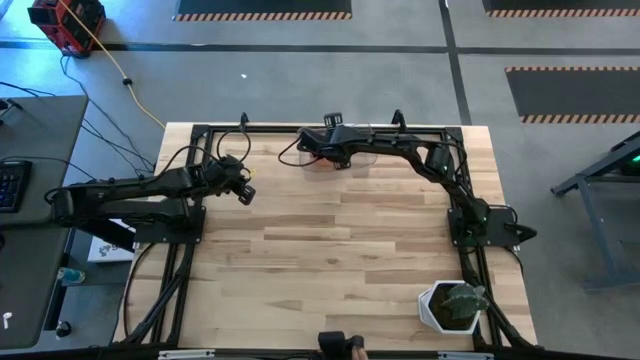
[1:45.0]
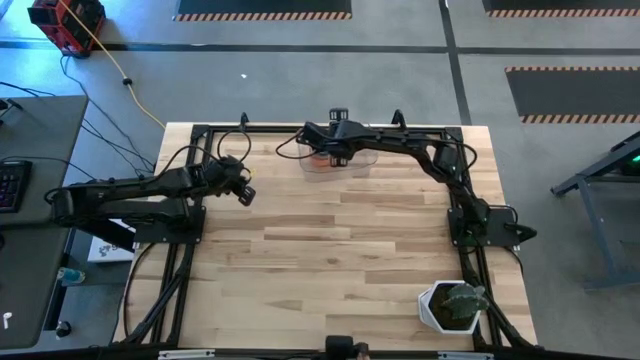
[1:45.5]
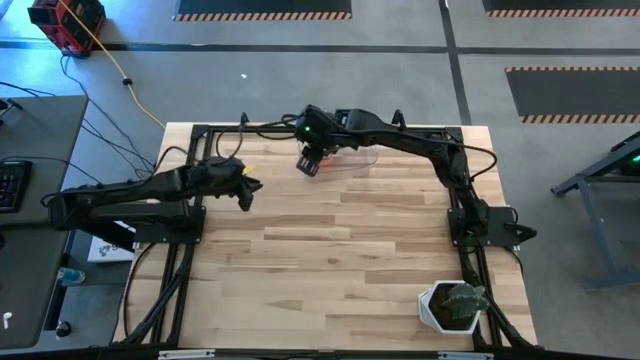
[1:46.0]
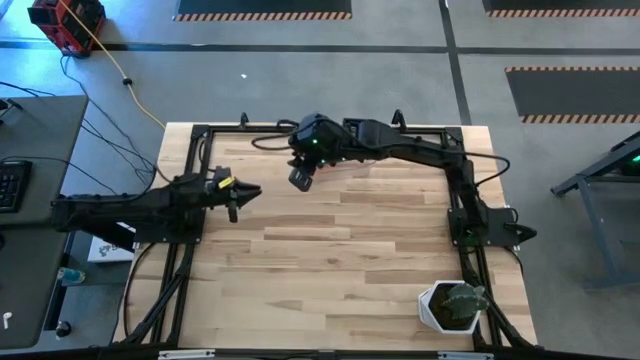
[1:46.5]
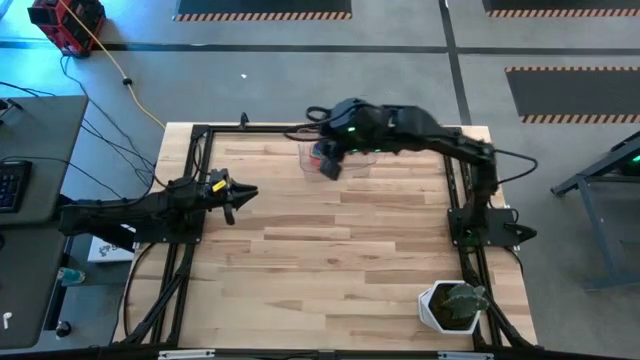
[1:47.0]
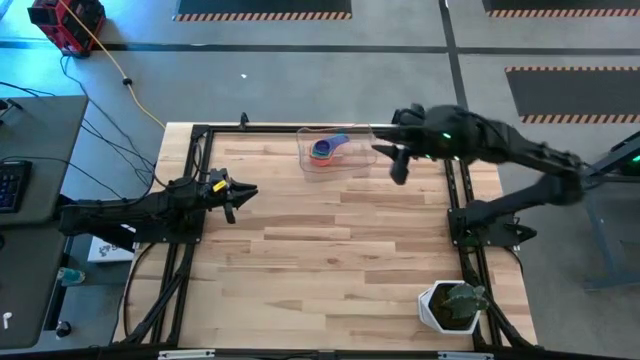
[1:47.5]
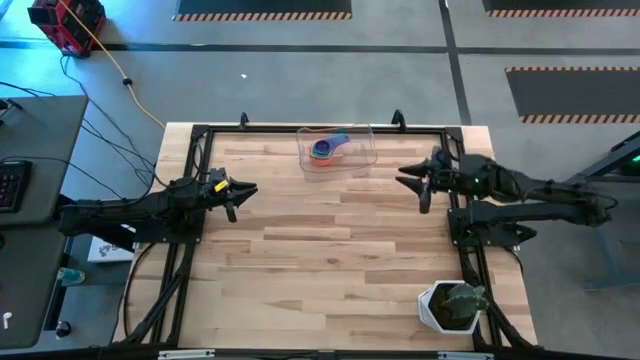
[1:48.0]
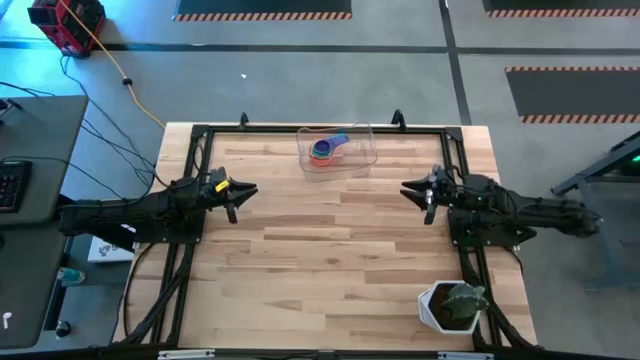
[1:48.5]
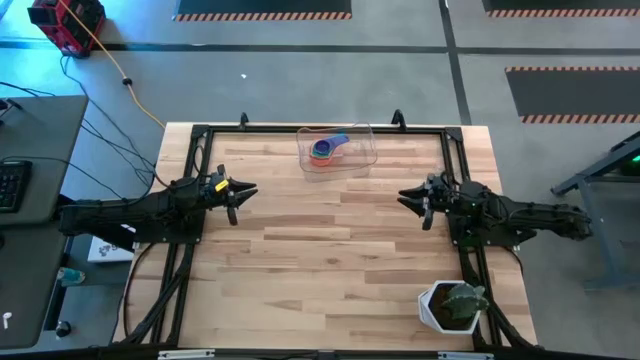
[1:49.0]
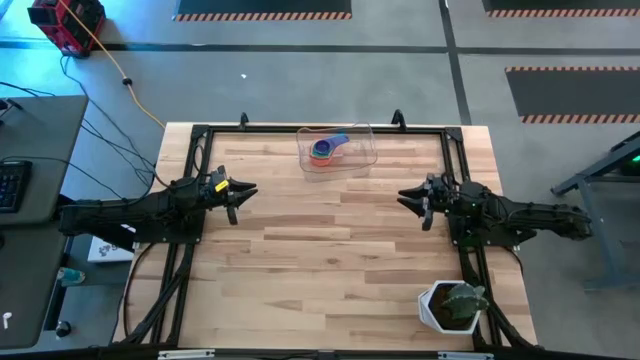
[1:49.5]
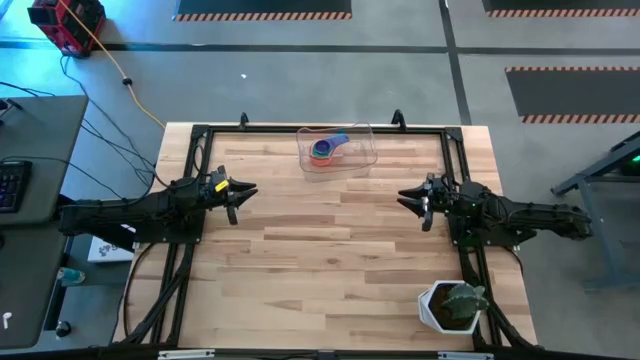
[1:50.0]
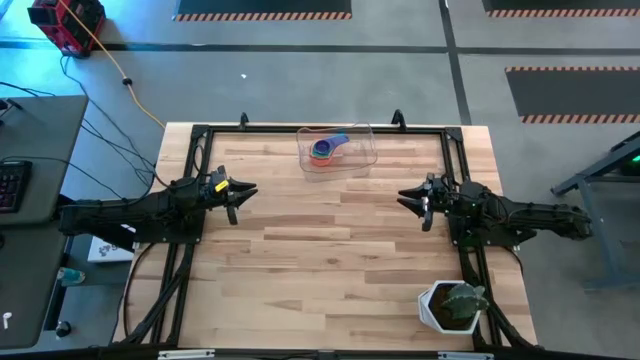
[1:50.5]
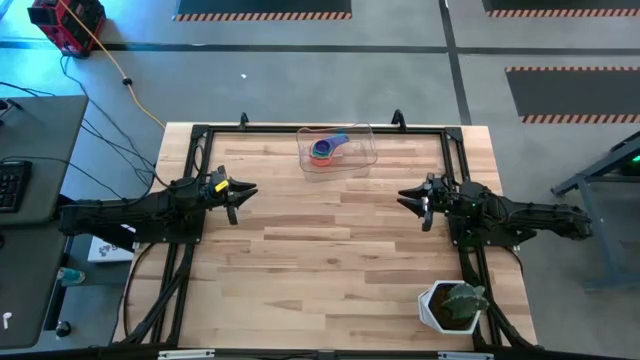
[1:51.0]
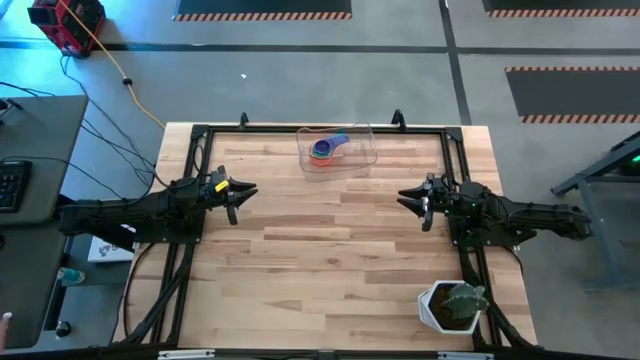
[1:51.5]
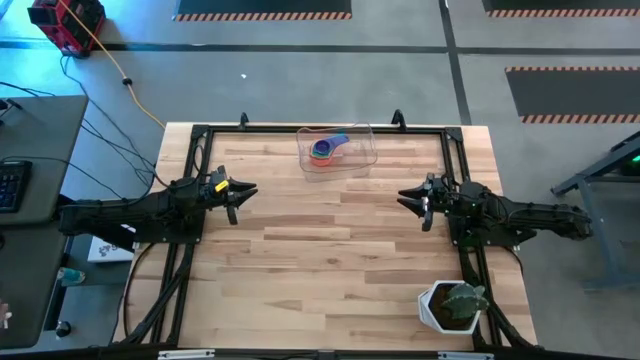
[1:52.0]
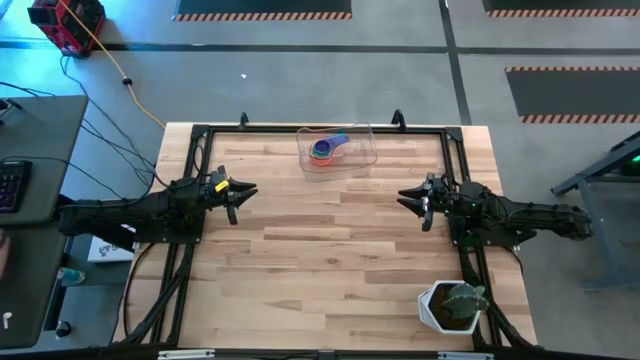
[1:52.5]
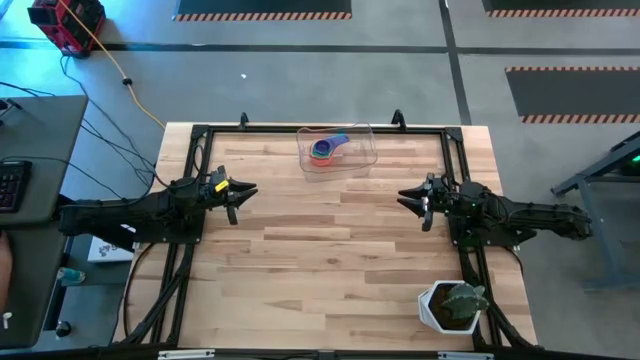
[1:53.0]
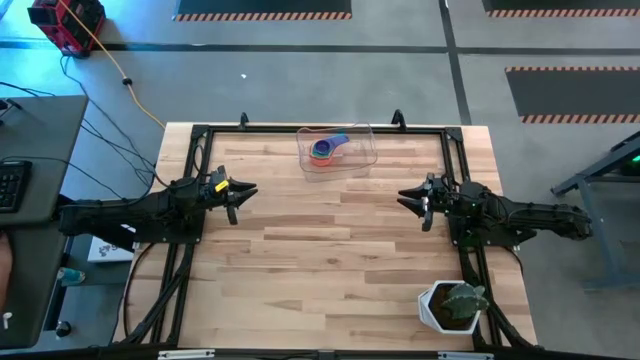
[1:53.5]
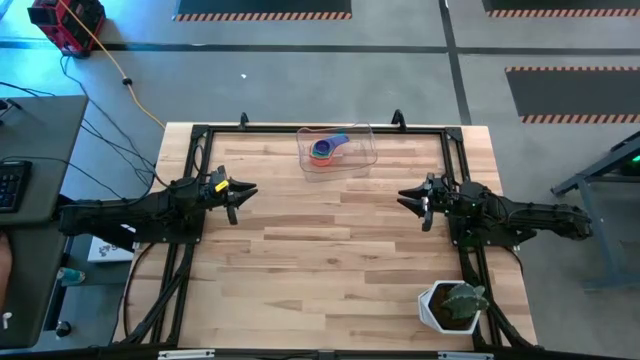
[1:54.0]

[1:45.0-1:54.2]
Task: Nest measuring cups in basket
Return to Home Position

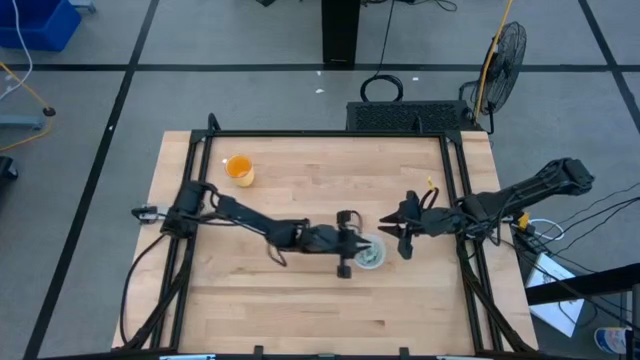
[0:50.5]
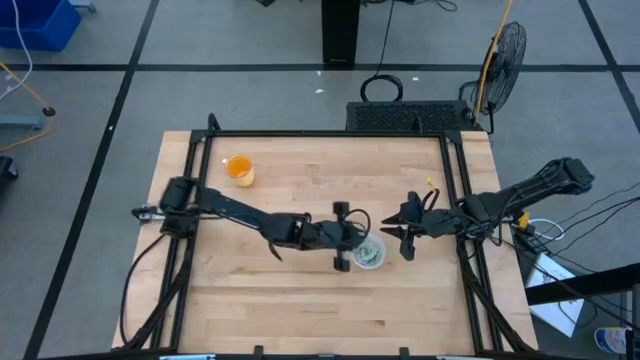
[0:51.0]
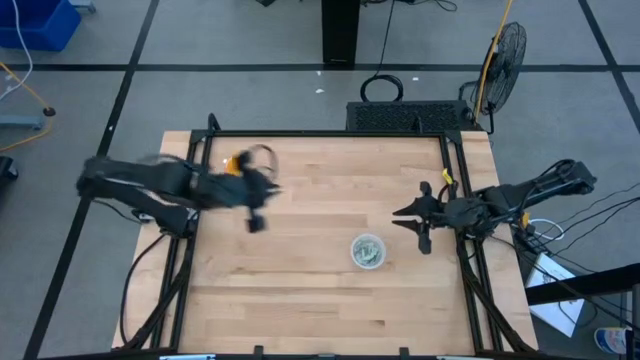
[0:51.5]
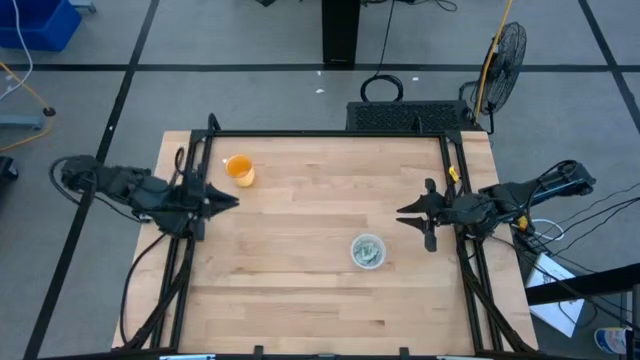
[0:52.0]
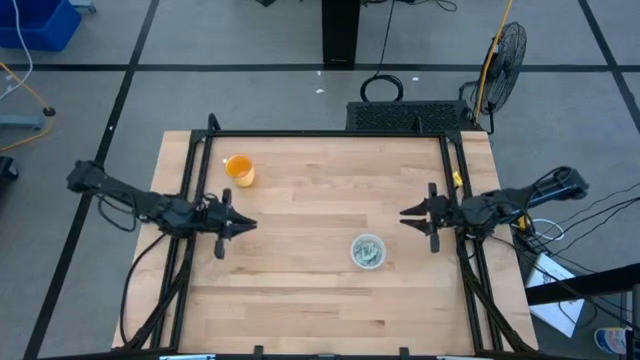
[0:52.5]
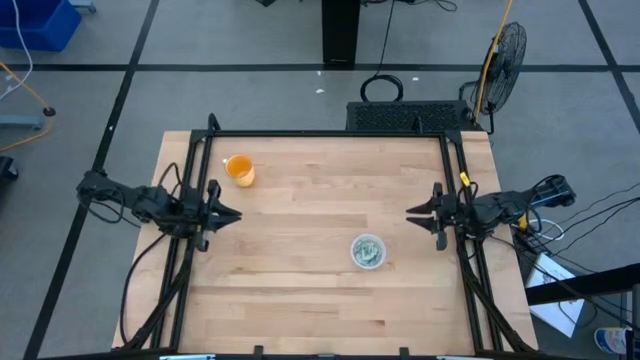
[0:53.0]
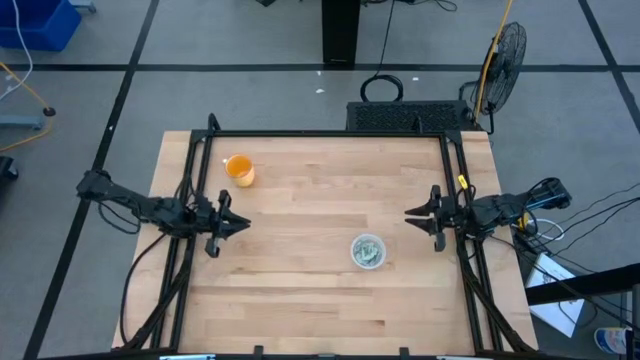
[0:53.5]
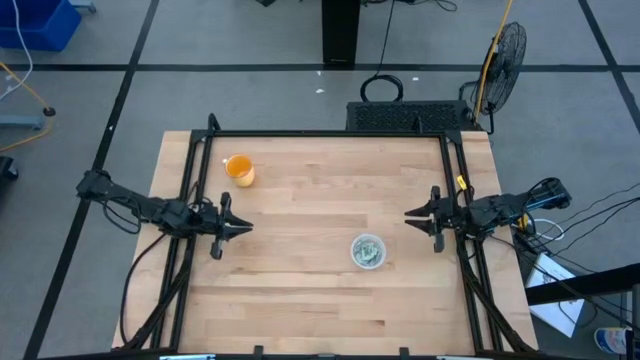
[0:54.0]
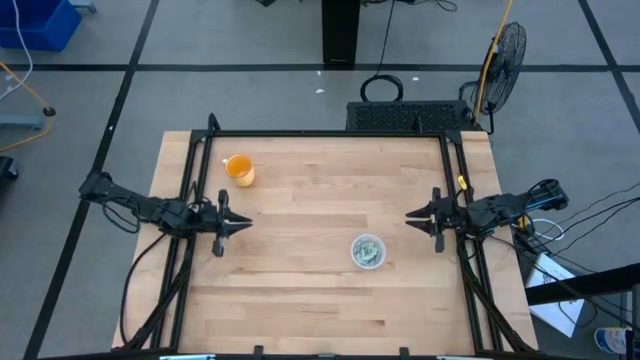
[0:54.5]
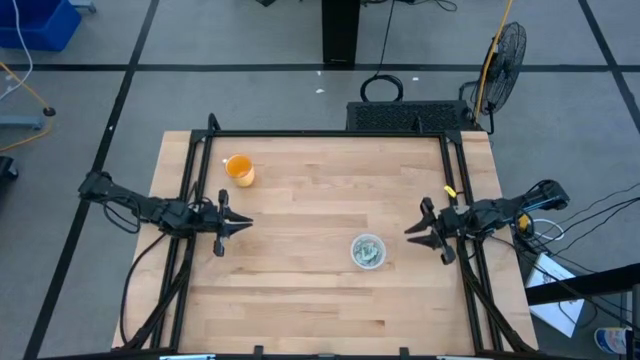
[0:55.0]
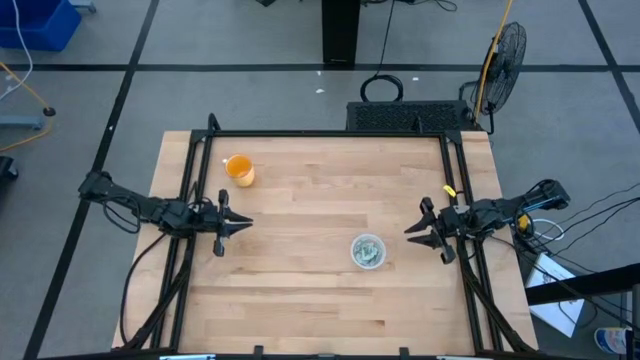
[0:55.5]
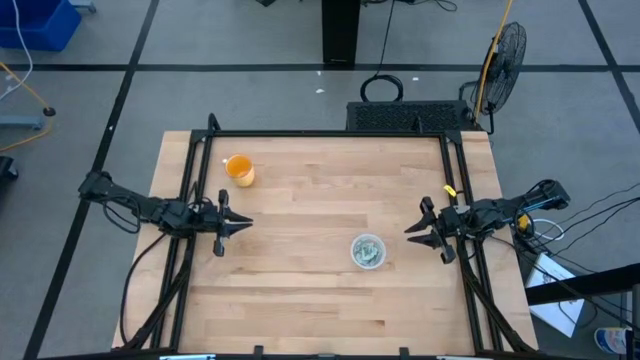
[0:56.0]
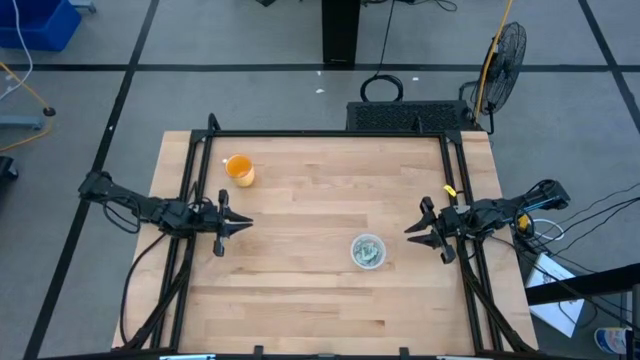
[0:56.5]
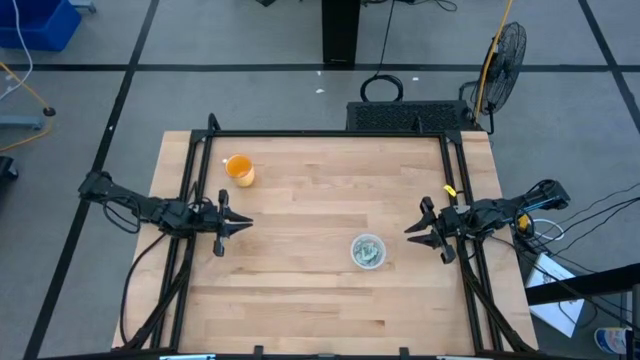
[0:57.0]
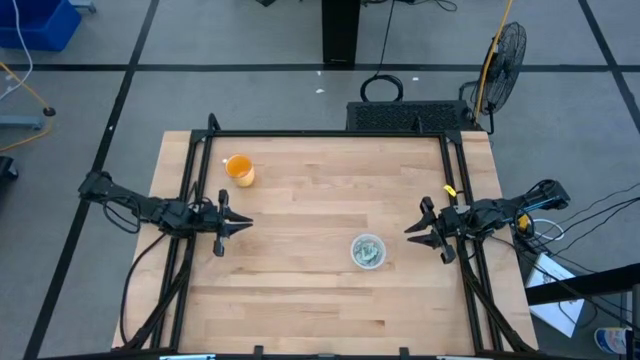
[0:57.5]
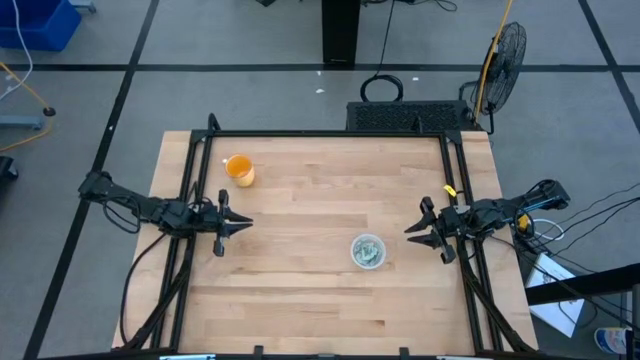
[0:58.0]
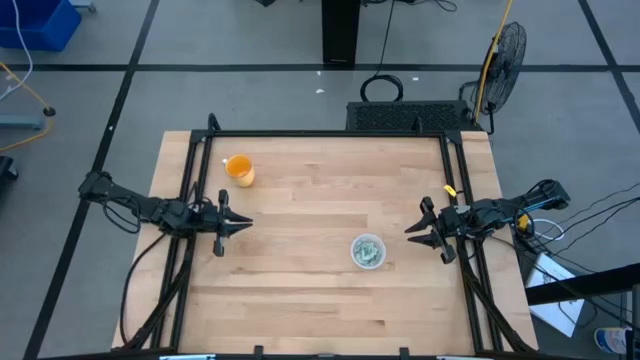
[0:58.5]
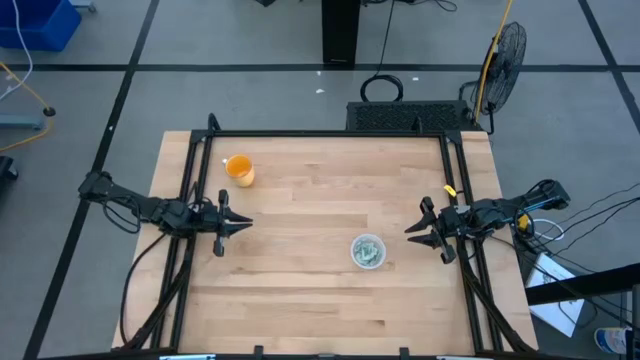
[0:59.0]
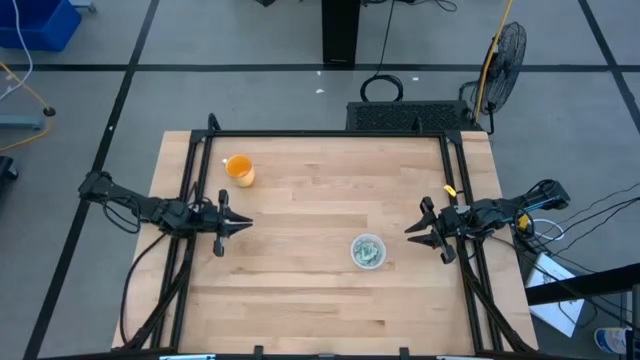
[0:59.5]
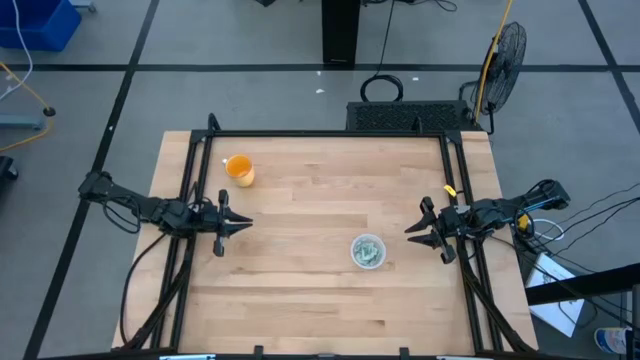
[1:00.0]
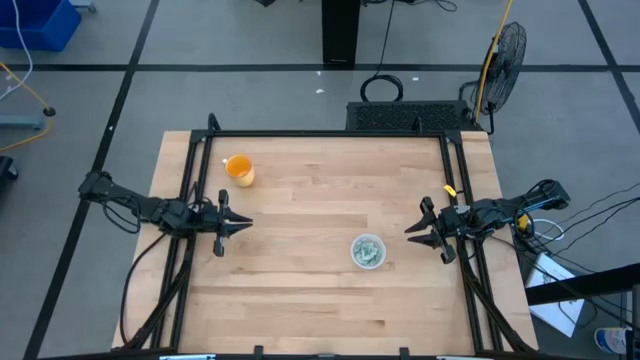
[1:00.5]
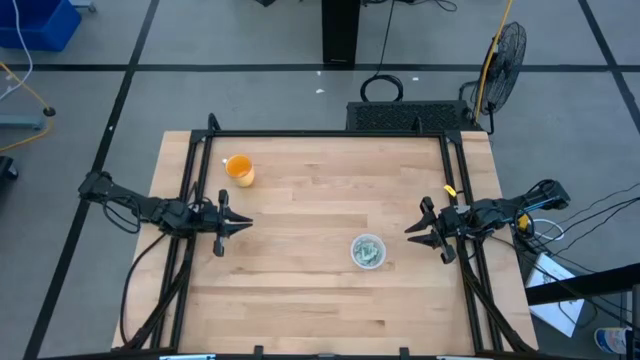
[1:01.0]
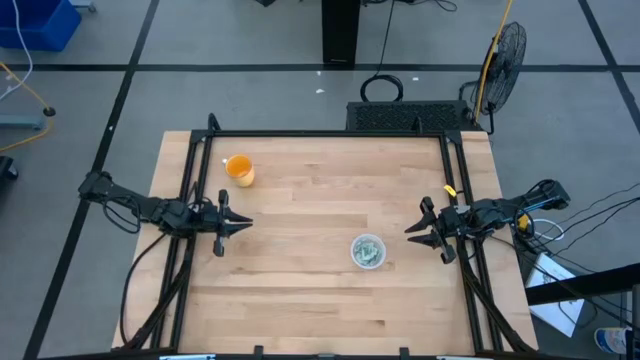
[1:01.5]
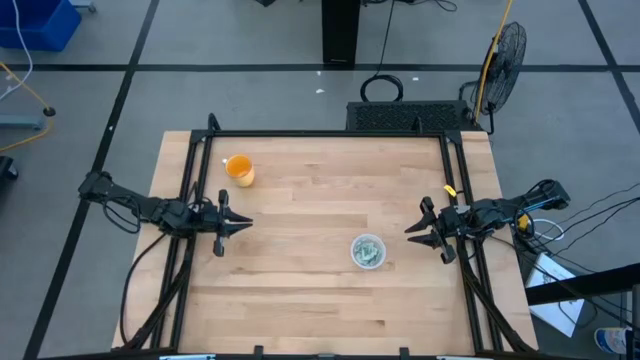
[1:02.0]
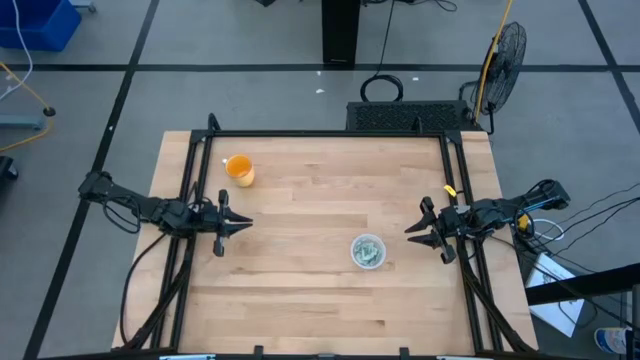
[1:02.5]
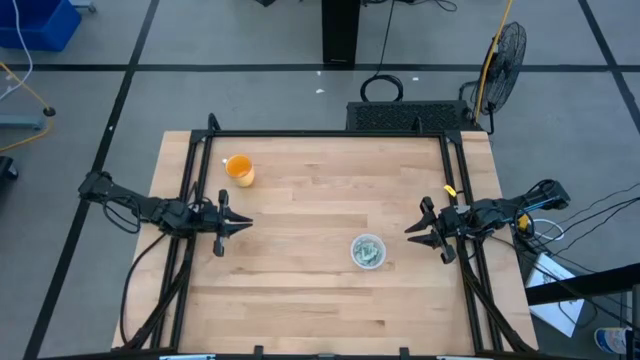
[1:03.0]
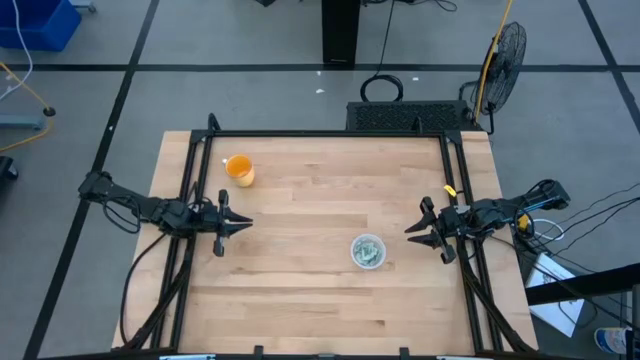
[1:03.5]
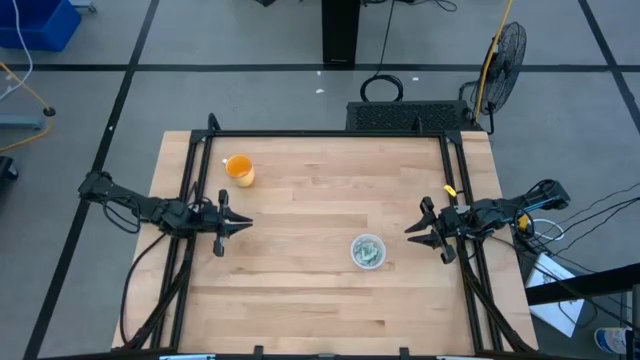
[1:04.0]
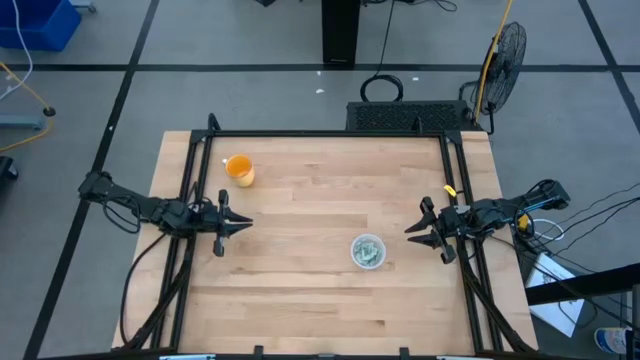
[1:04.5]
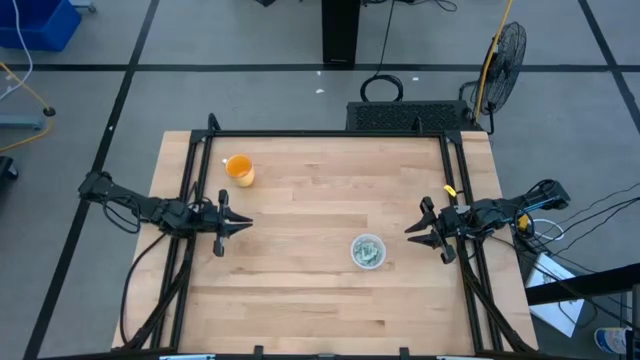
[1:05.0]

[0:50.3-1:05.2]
Task: Pick and place Stevia / Truvia into bins
Return to Home Position
